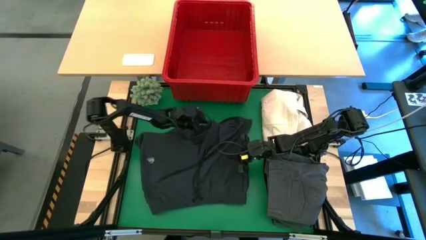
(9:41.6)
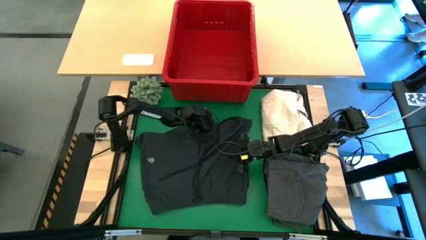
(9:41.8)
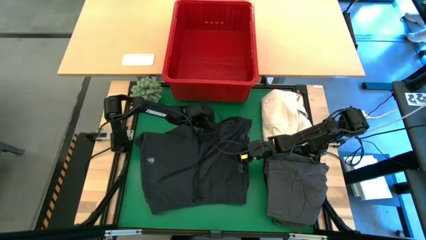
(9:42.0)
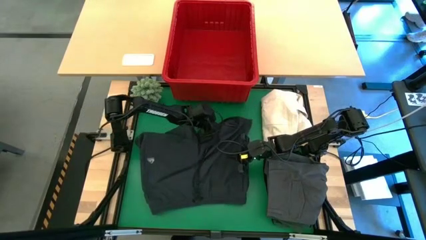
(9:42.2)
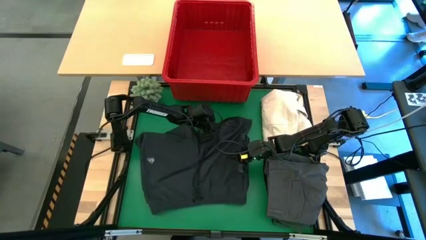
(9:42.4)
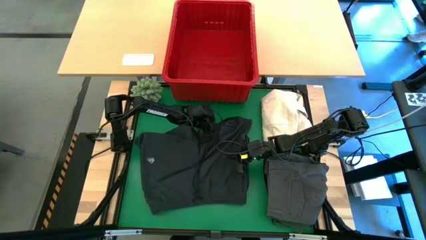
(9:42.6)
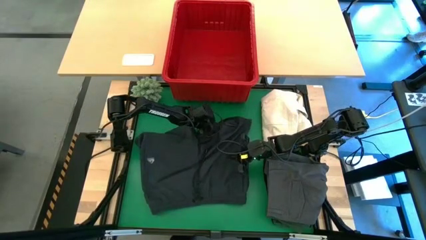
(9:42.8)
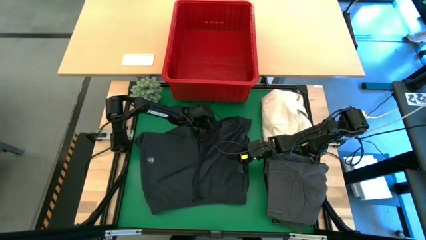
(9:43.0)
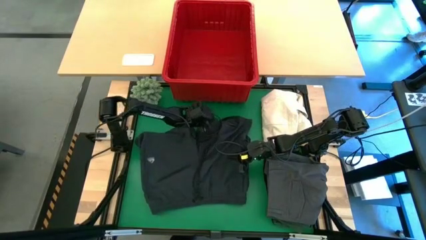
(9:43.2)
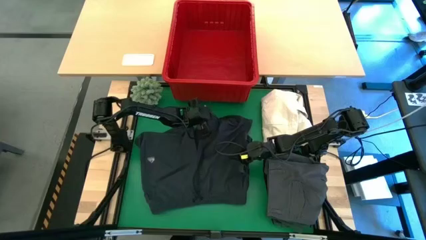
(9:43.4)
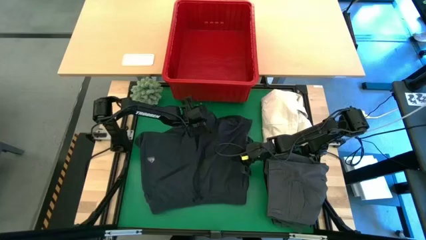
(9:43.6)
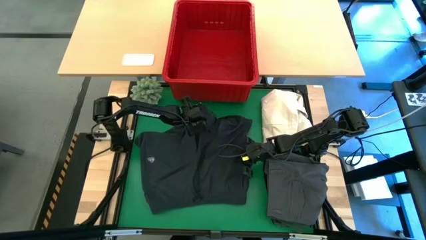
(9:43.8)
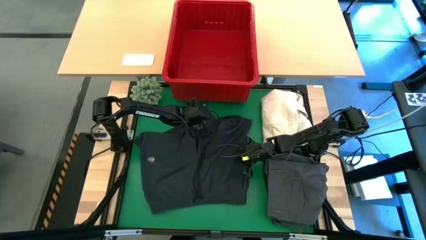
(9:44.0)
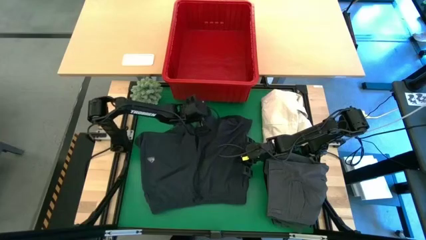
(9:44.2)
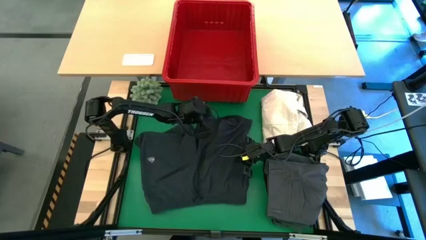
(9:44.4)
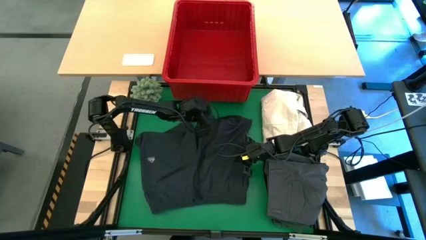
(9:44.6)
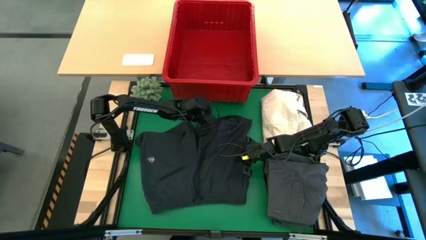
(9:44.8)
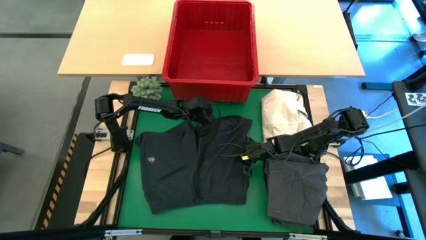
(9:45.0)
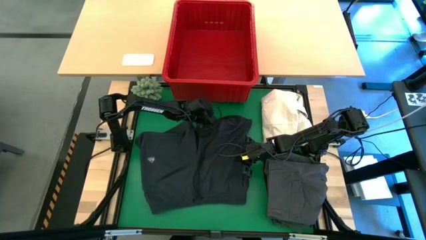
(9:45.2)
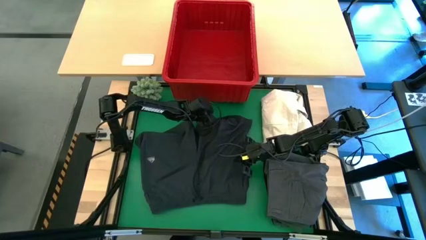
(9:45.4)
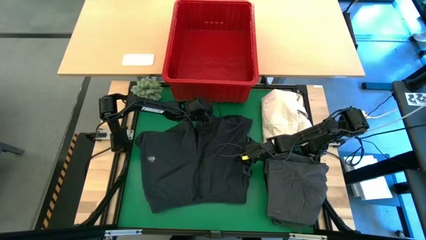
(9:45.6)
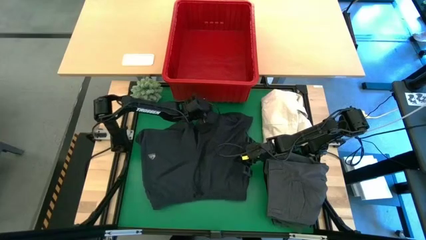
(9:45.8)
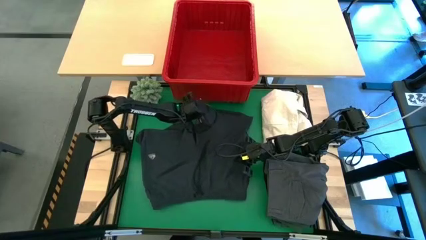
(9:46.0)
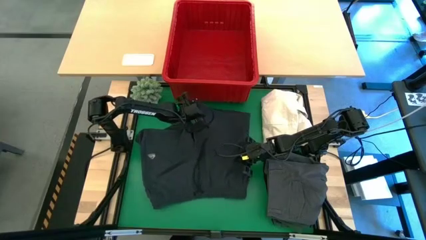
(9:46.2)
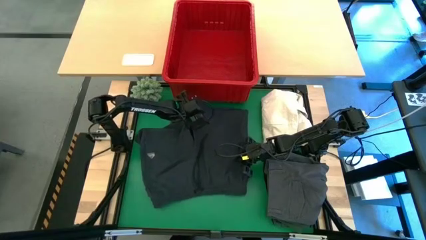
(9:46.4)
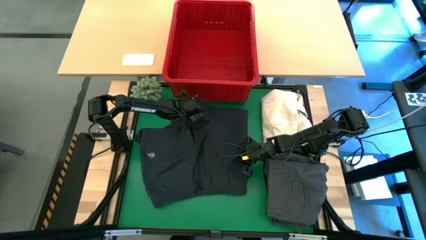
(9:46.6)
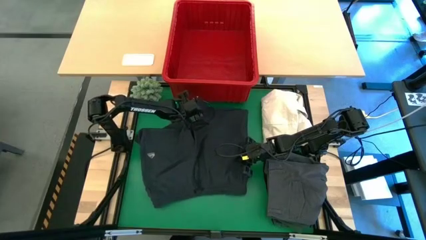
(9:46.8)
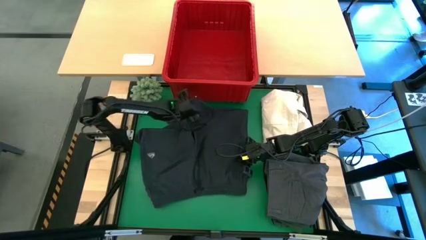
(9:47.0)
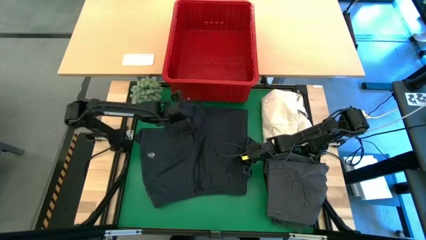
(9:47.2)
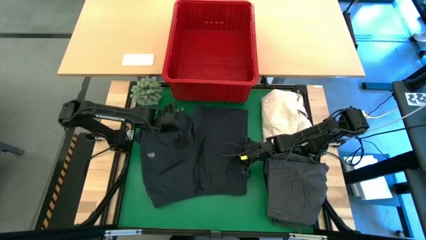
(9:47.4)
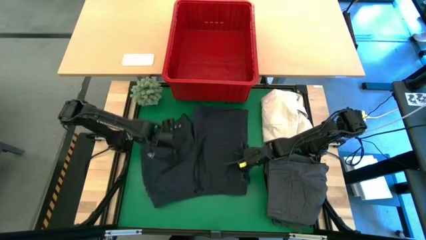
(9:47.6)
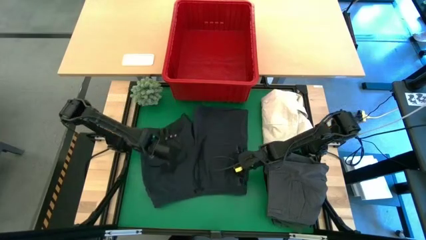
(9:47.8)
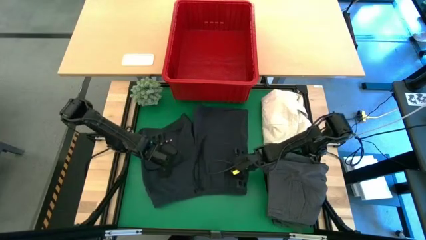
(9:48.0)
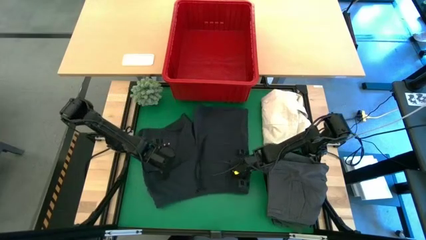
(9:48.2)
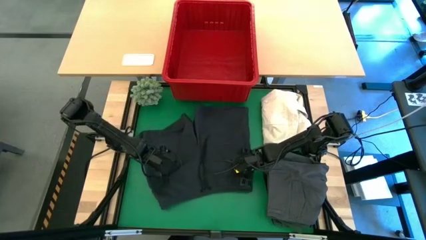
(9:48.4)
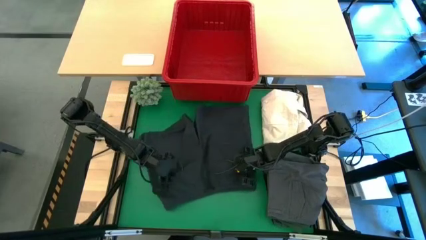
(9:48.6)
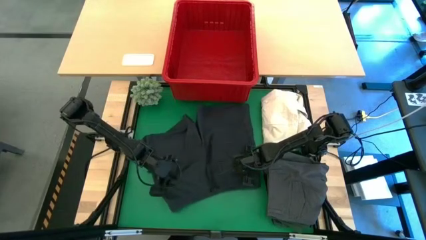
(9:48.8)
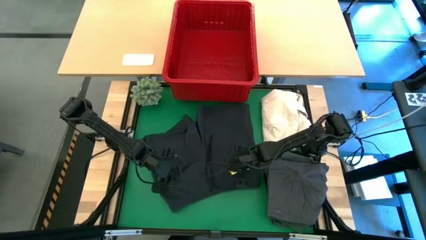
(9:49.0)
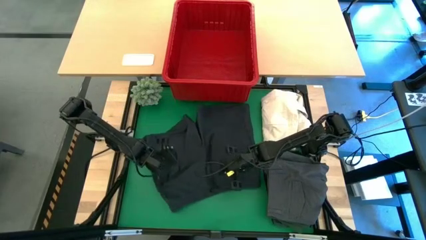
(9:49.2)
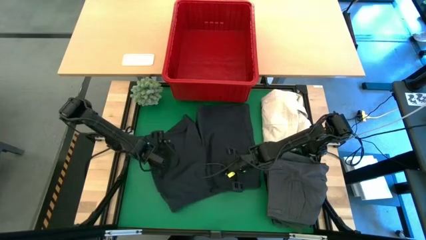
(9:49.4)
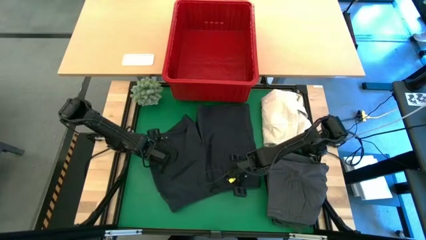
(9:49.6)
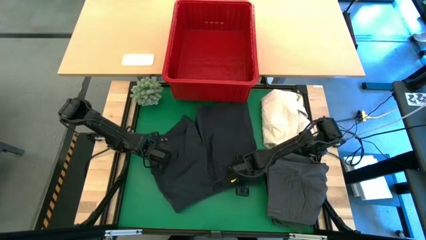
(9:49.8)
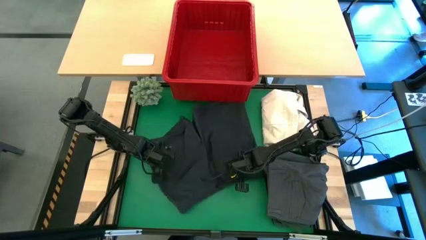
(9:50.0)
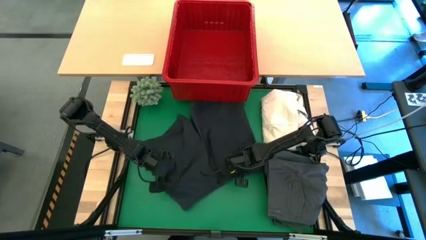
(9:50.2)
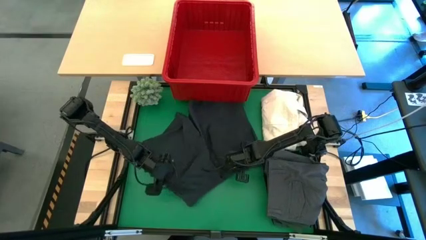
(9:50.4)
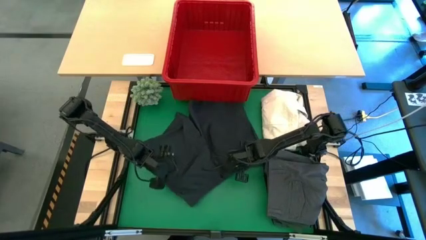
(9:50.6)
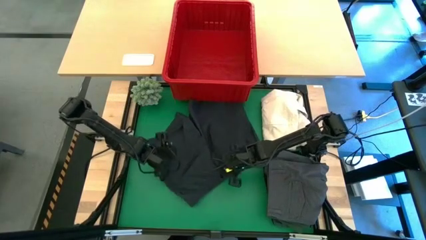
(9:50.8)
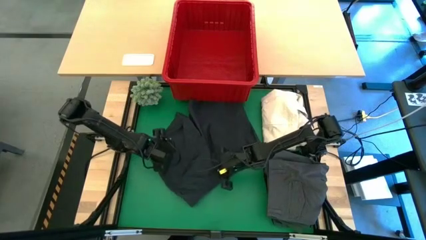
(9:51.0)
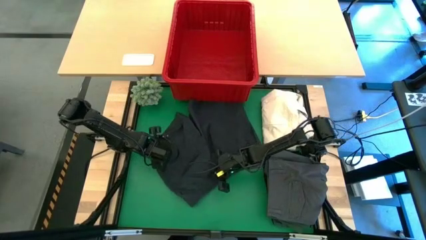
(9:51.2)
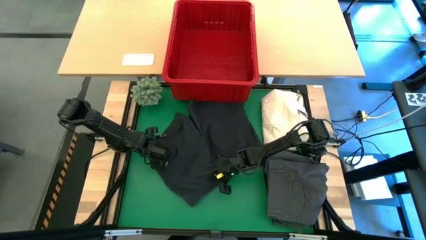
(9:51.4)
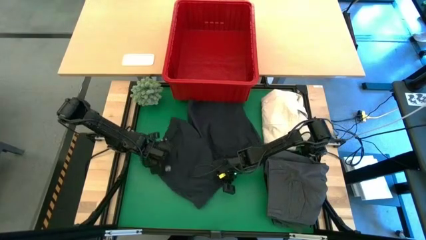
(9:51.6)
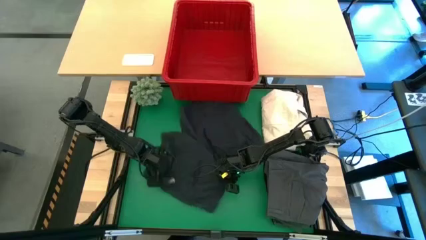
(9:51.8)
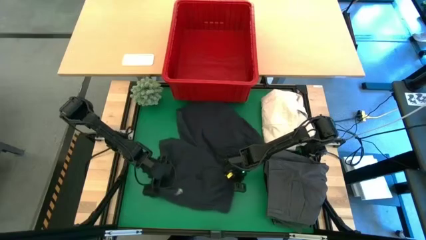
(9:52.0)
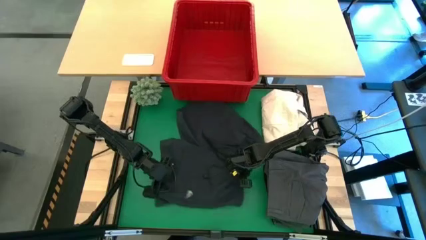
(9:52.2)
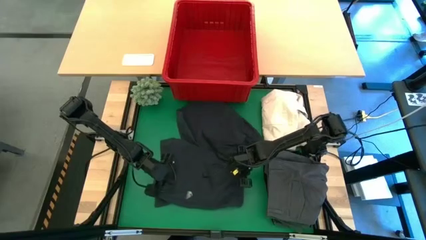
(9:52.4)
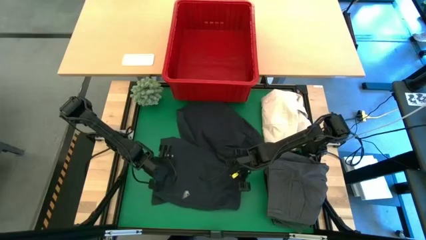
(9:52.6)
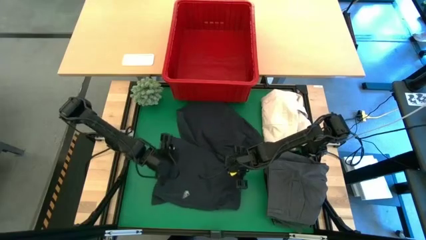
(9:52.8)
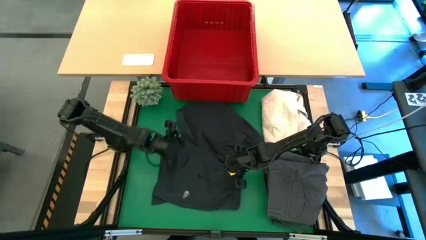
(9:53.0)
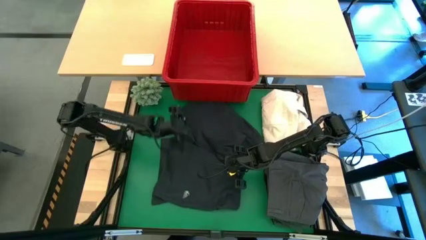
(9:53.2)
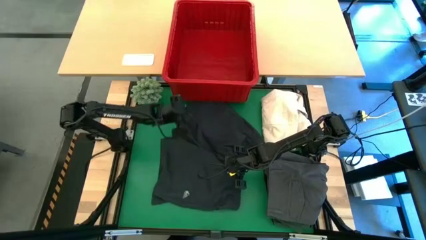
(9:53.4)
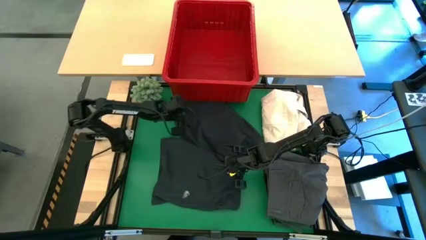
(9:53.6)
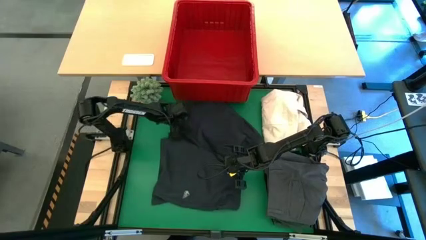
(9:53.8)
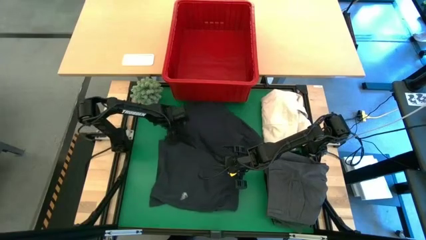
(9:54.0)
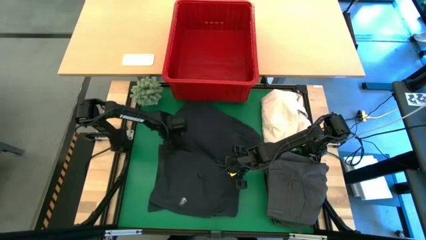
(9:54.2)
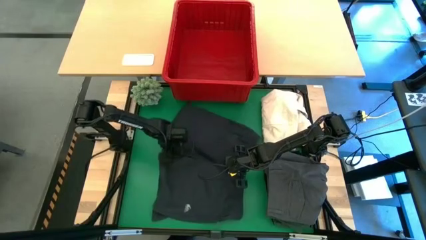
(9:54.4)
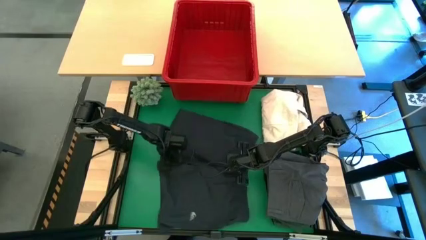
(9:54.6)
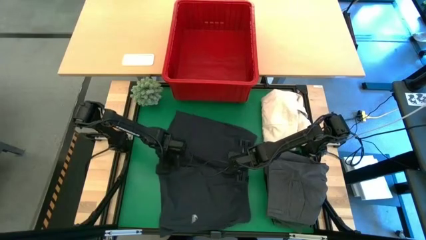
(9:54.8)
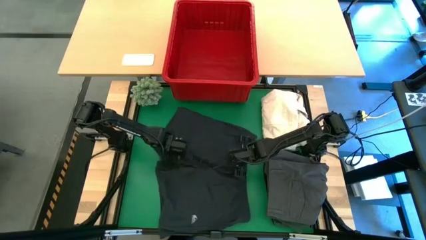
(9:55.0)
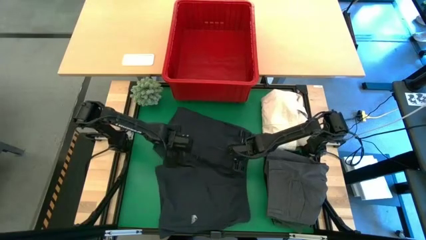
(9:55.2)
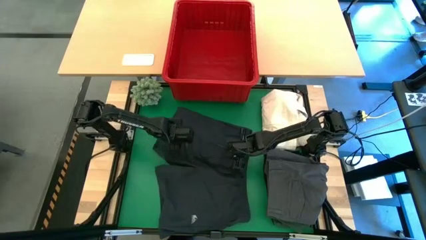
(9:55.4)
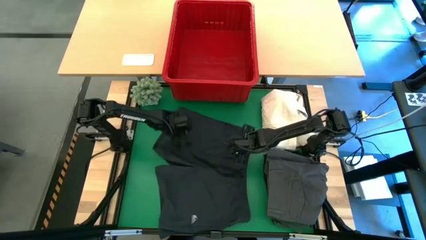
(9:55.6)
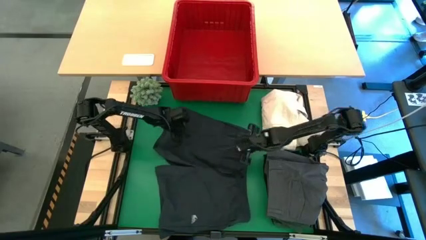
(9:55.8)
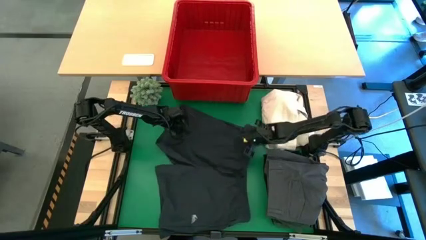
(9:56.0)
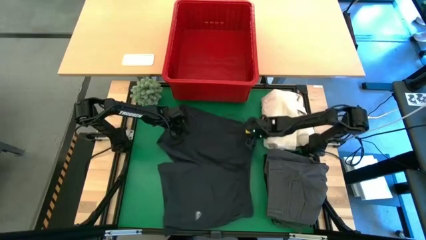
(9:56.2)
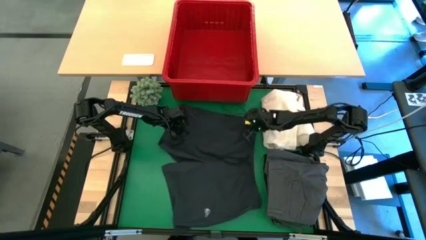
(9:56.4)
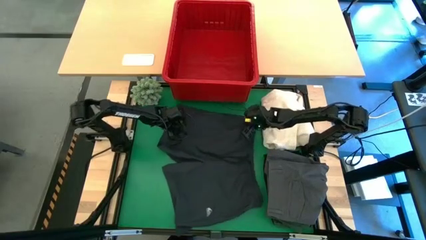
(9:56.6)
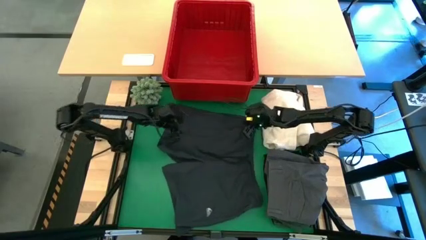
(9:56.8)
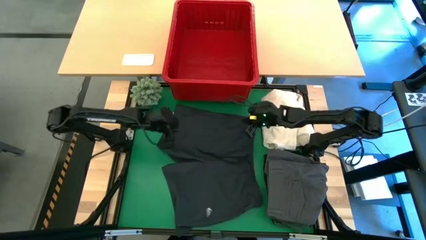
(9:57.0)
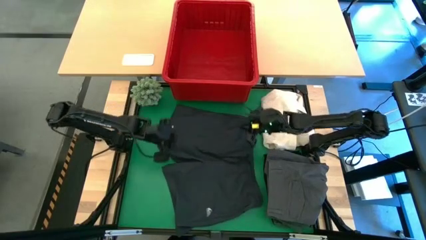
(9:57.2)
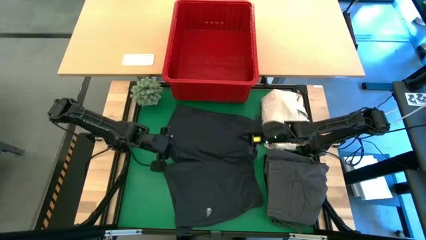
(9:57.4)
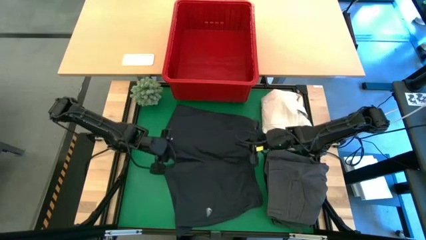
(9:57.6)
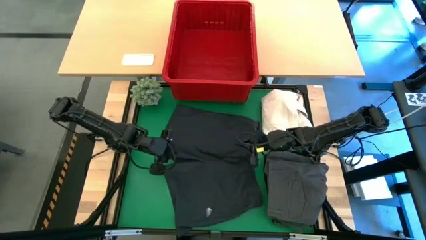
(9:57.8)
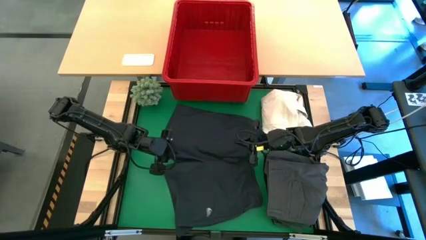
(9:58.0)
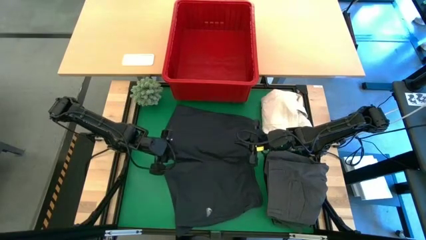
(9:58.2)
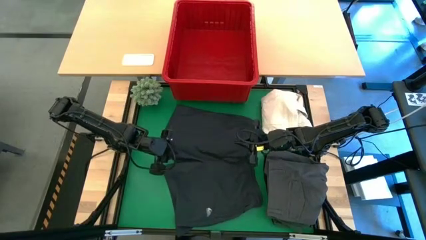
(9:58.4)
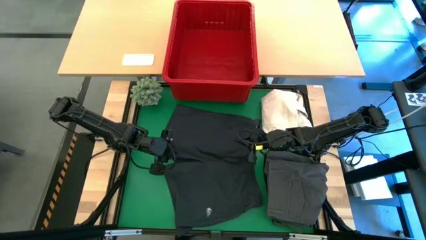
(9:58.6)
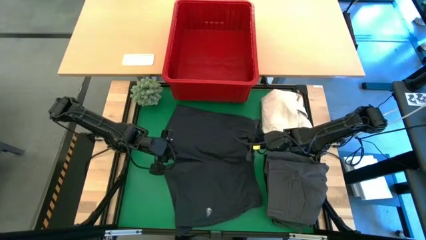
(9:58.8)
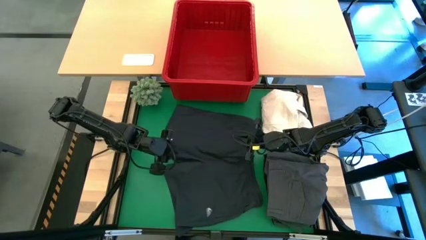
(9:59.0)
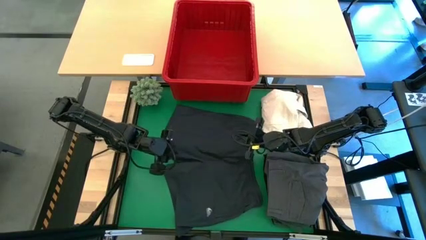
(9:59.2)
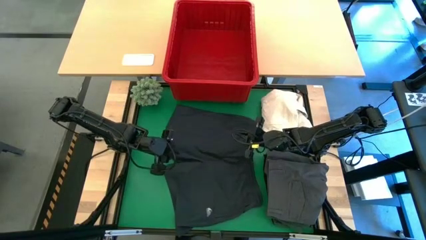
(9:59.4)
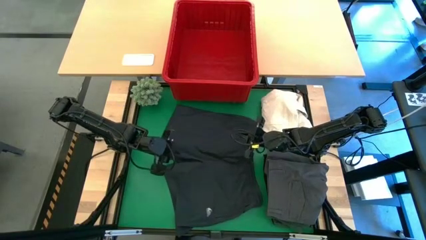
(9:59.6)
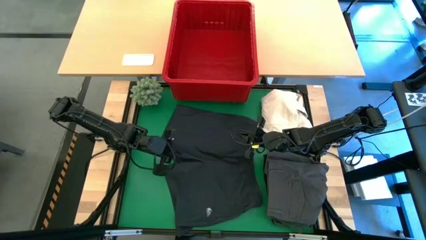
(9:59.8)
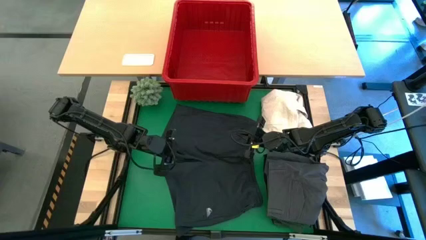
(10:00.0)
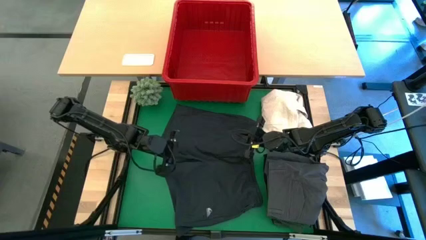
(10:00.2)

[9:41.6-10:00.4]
Task: Fold laundry
Fold the gray short
